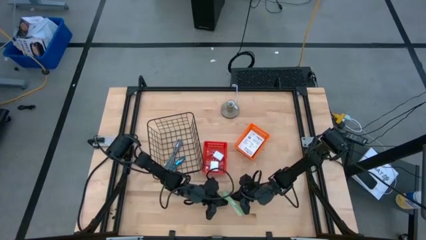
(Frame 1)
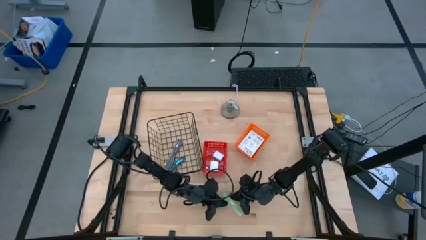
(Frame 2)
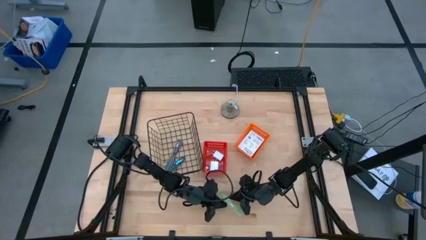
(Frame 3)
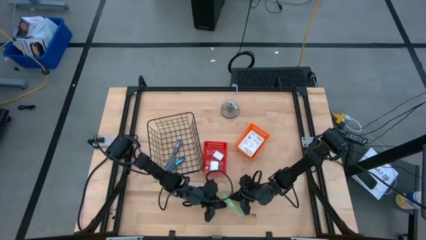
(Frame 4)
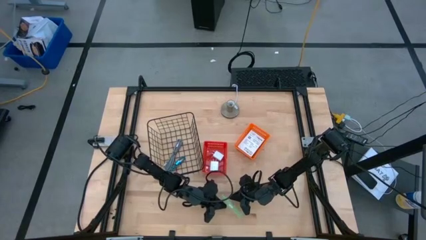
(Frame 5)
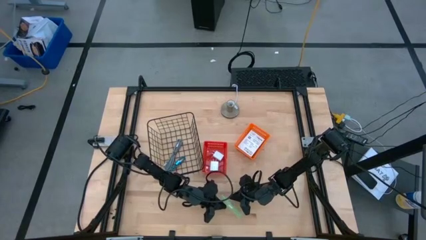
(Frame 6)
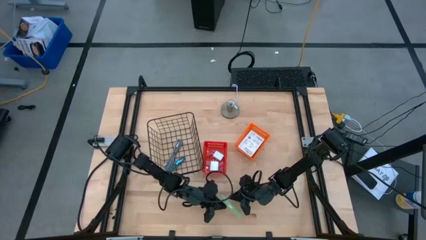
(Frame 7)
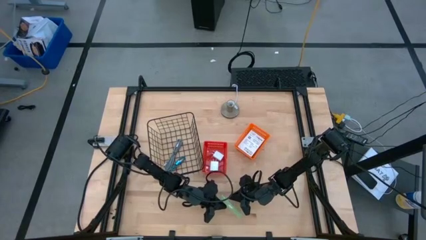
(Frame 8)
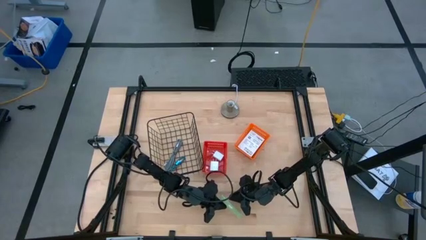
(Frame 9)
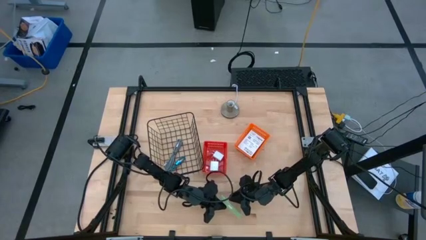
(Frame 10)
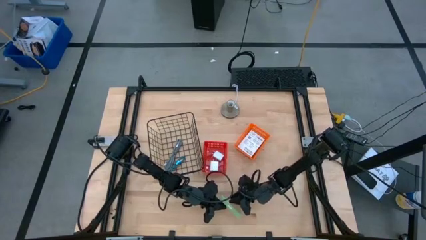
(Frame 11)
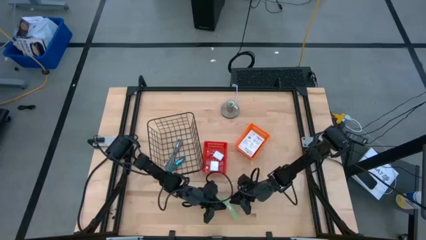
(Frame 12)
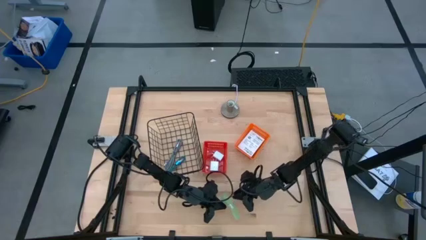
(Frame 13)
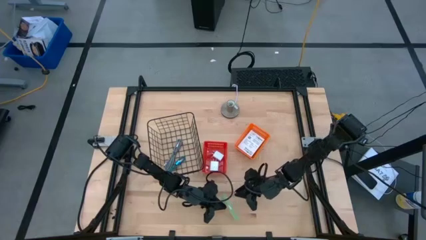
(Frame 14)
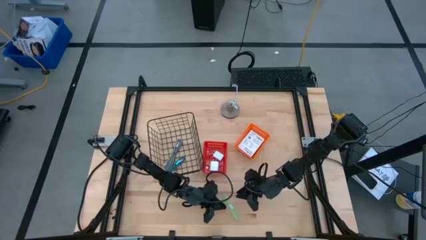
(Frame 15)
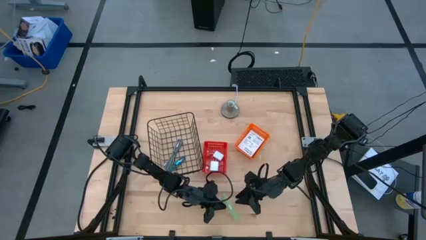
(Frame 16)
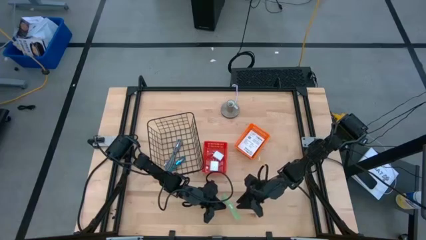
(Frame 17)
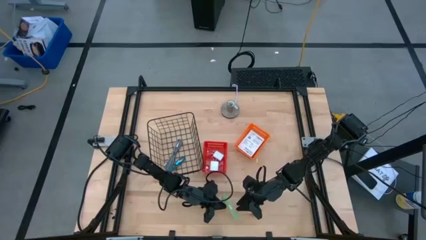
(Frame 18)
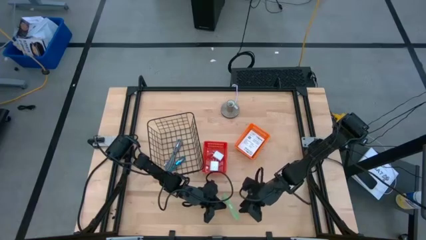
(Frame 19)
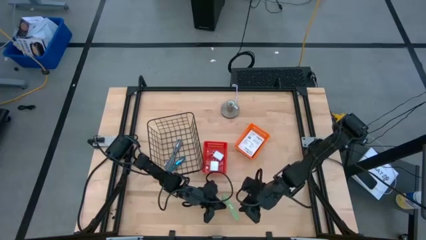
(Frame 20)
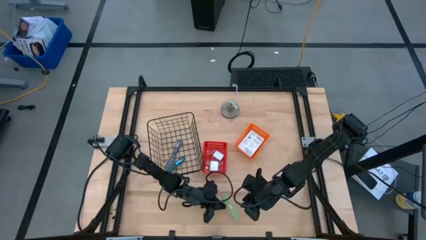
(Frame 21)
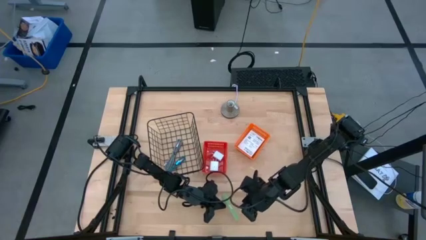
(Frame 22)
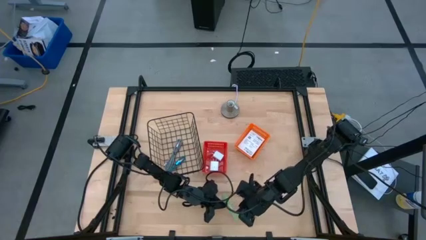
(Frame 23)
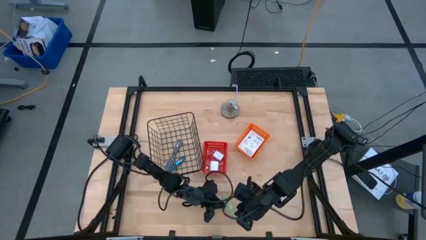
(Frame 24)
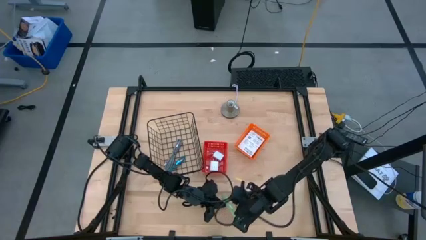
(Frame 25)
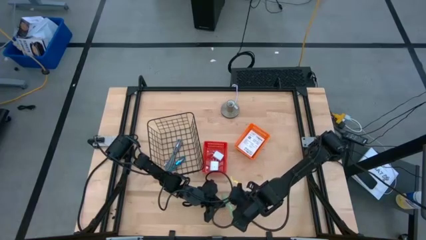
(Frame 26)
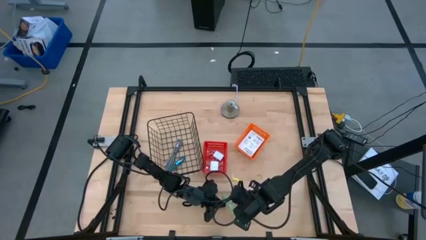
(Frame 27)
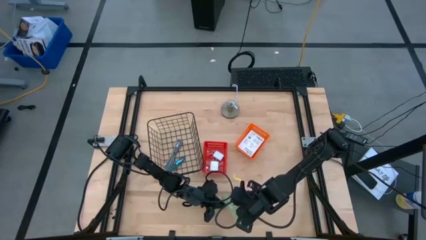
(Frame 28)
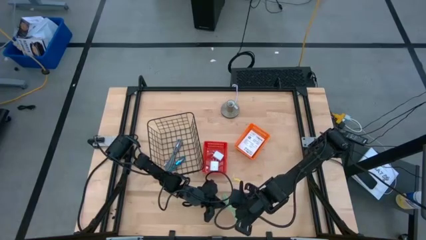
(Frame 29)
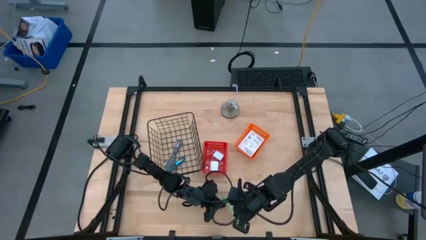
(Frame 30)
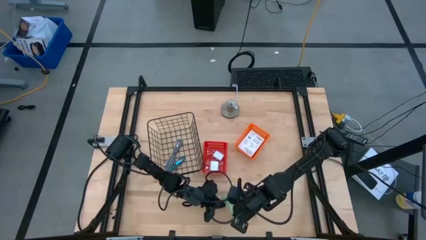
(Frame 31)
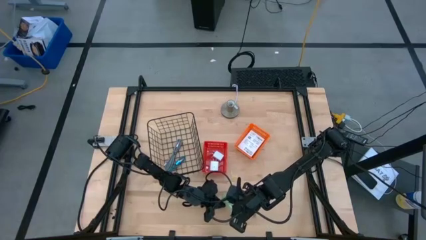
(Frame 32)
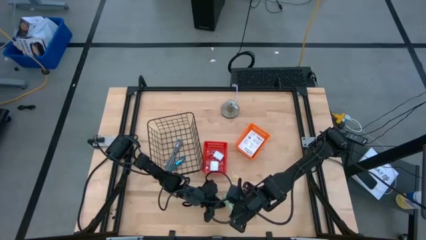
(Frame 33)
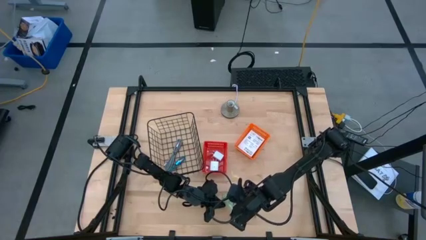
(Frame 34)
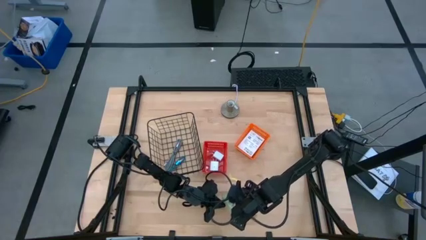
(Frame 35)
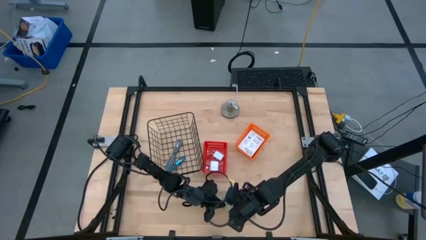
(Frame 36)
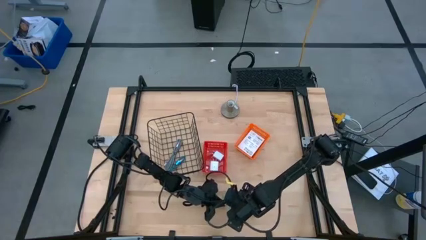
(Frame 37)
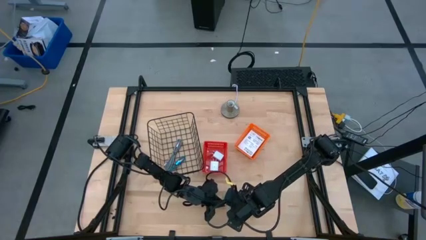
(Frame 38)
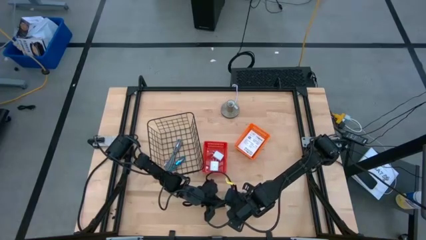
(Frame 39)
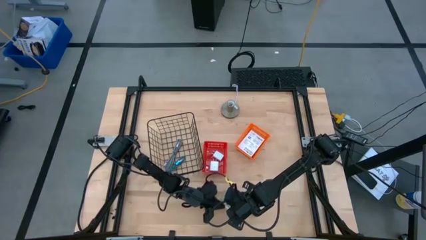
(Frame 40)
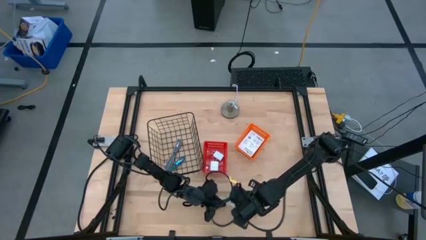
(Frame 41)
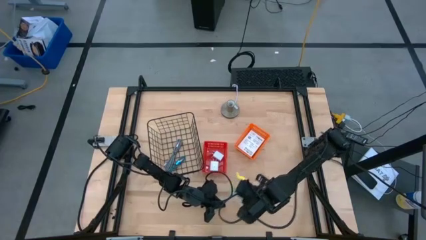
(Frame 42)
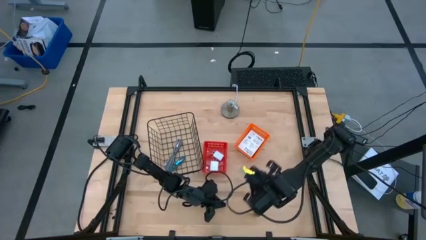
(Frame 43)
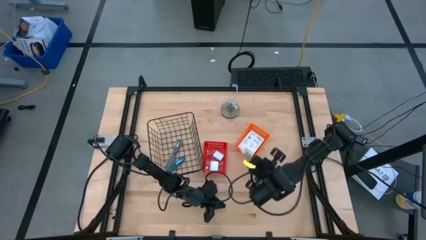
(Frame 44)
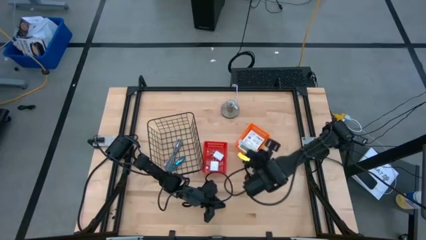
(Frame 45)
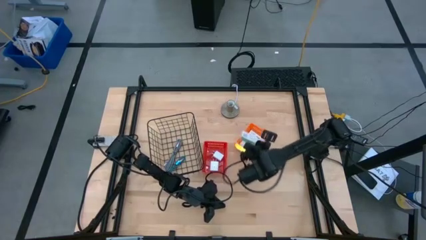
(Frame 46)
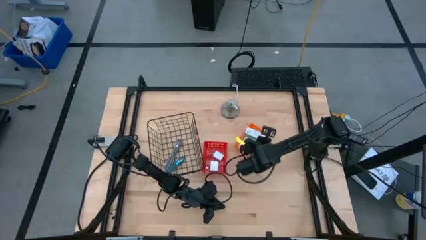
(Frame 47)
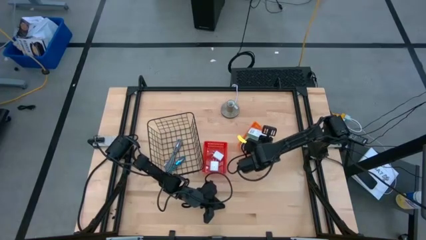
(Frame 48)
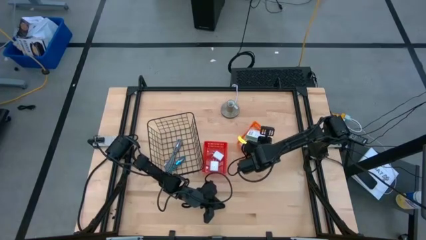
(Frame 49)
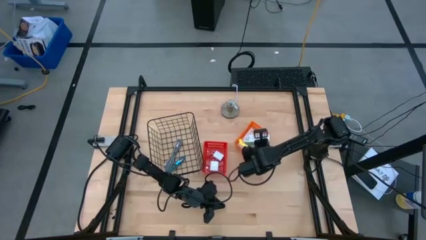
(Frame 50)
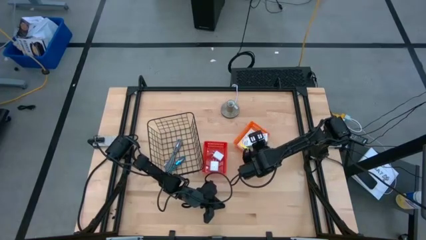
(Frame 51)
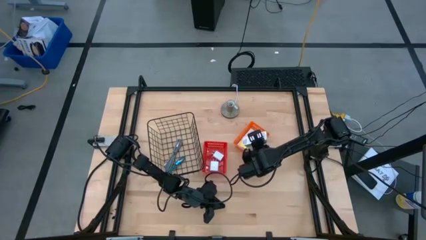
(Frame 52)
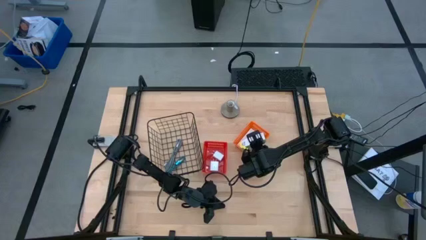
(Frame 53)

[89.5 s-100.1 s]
Task: Pick and place items into bin
Put the card reader box into the orange basket
